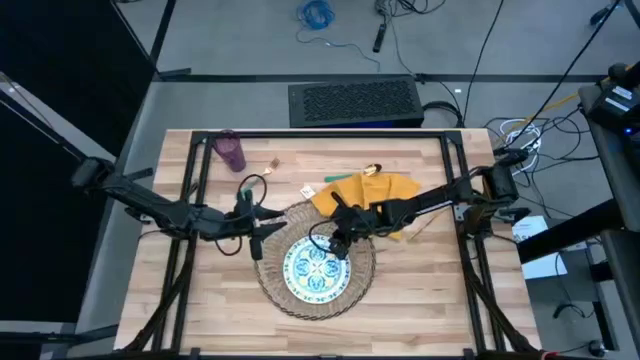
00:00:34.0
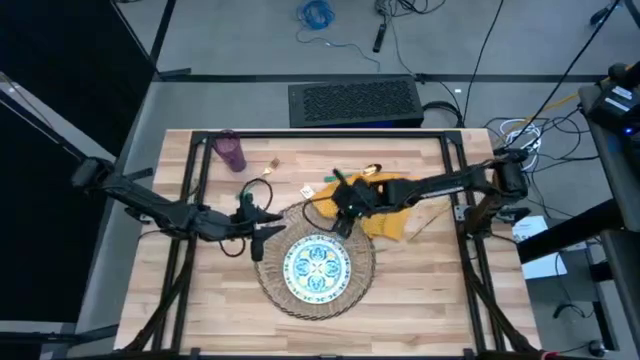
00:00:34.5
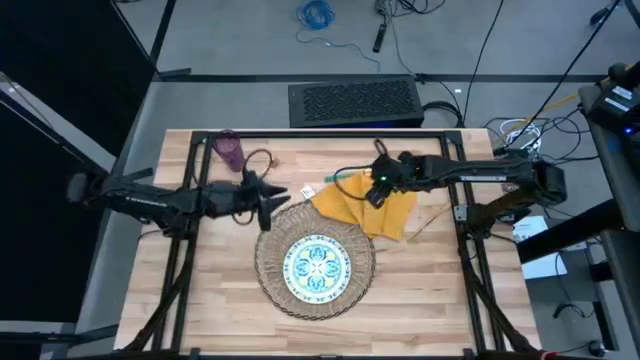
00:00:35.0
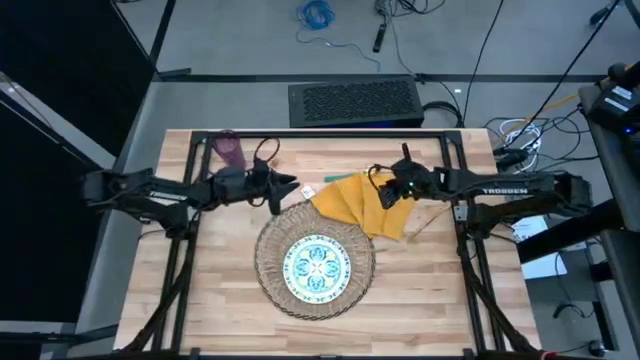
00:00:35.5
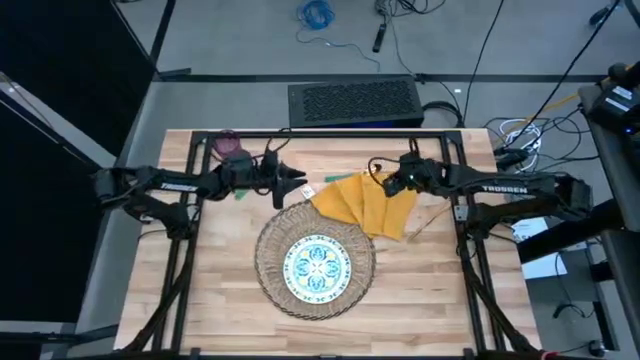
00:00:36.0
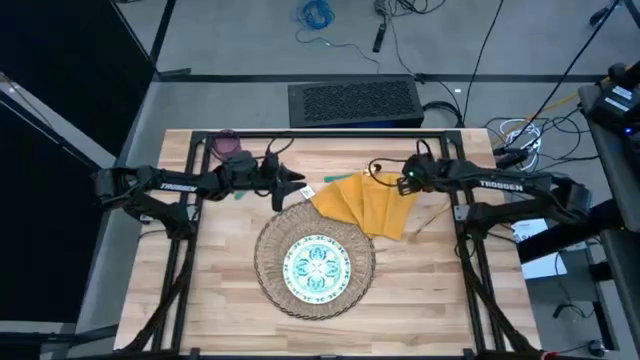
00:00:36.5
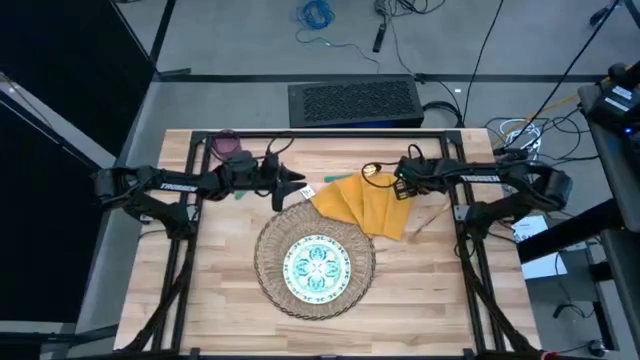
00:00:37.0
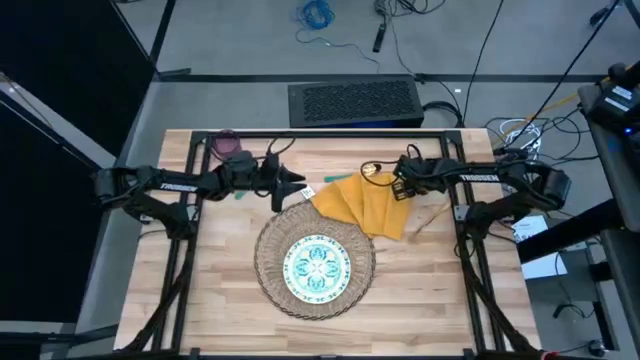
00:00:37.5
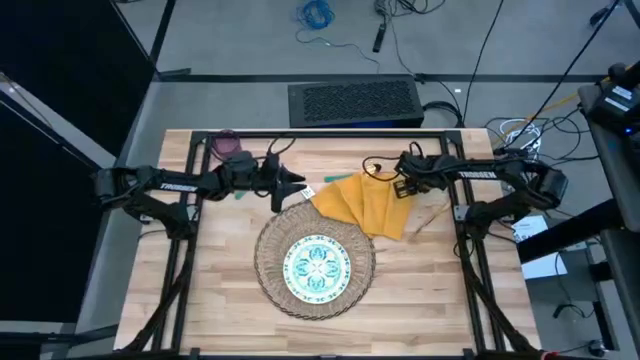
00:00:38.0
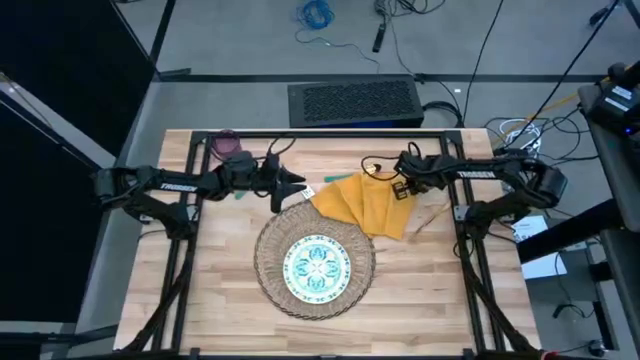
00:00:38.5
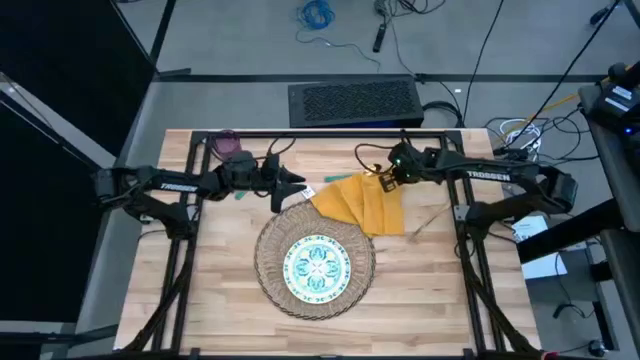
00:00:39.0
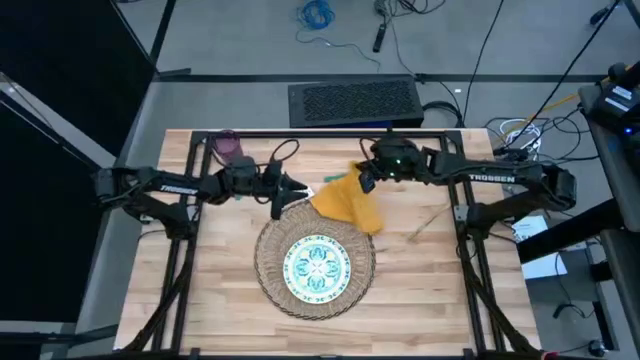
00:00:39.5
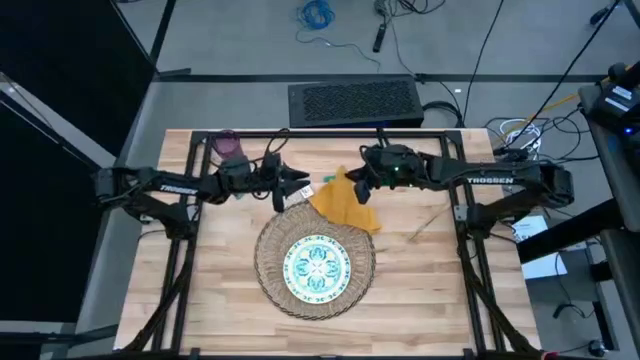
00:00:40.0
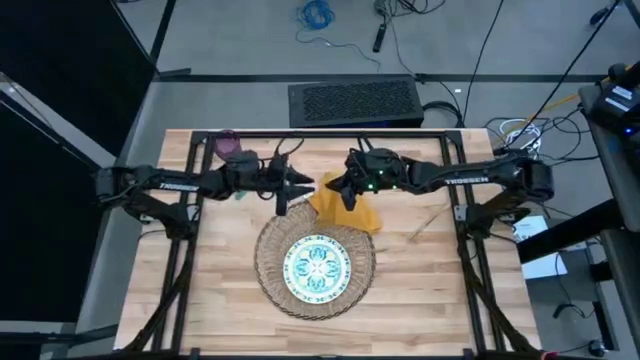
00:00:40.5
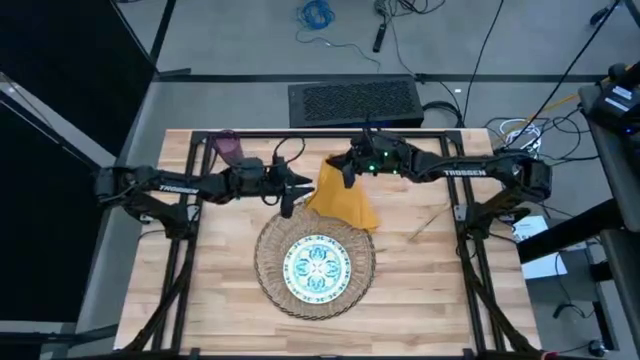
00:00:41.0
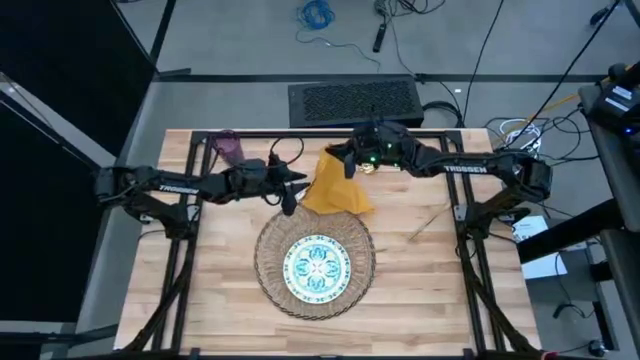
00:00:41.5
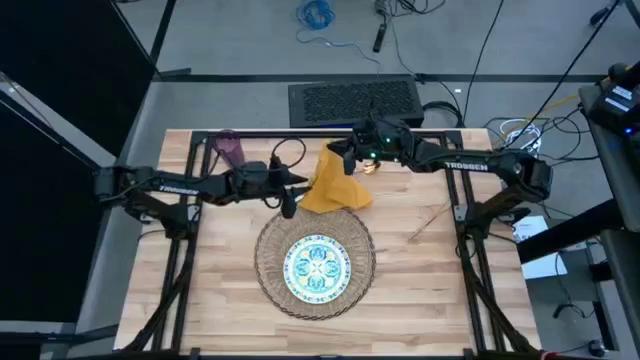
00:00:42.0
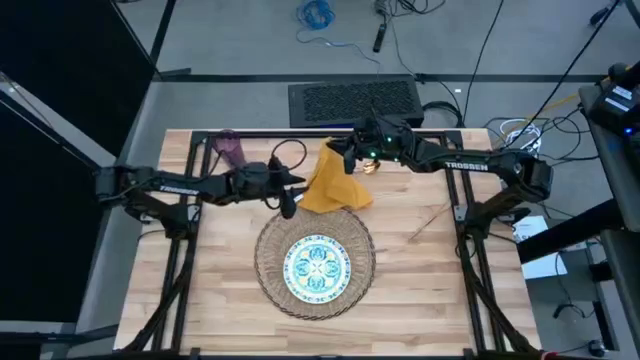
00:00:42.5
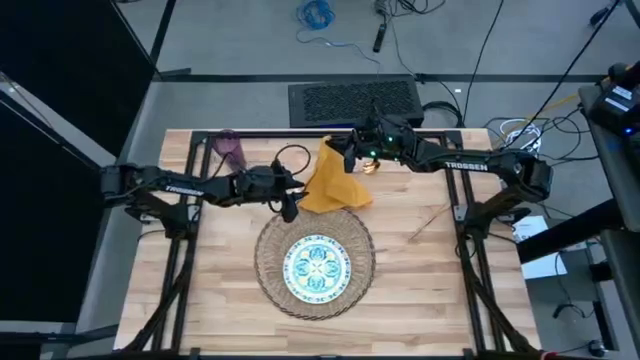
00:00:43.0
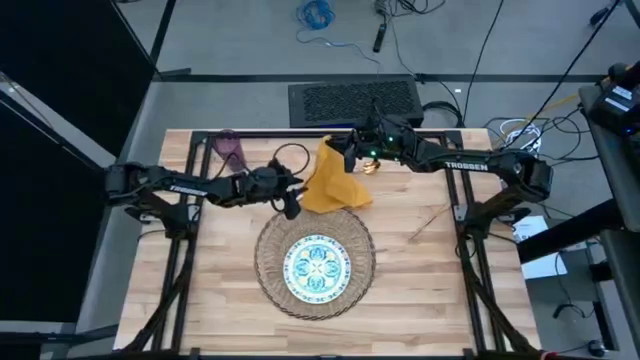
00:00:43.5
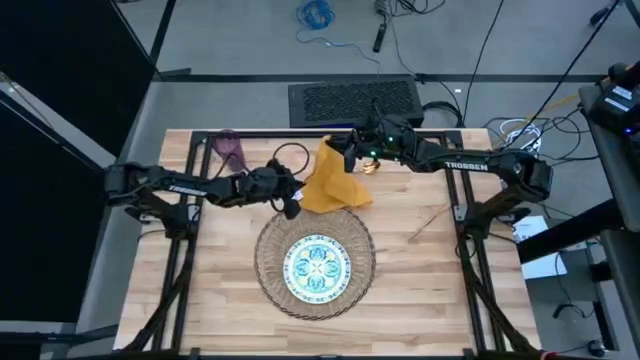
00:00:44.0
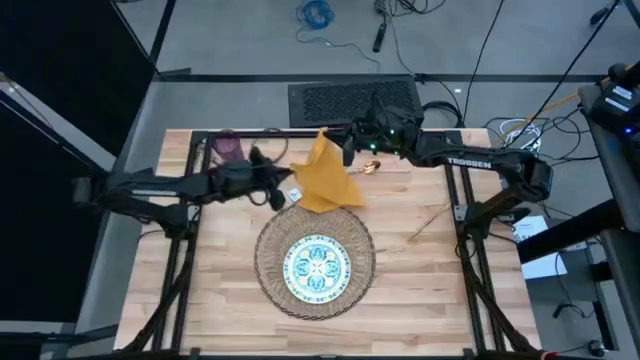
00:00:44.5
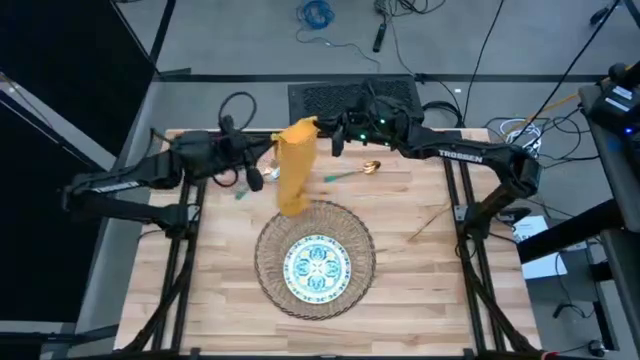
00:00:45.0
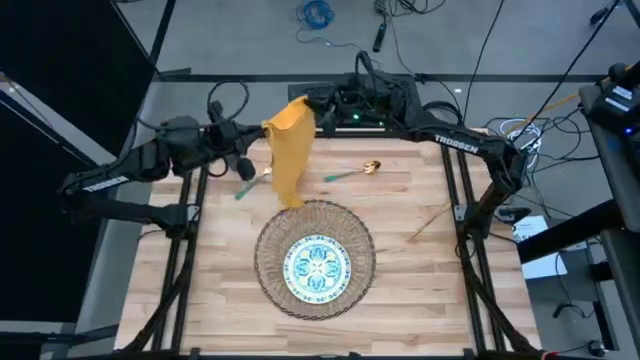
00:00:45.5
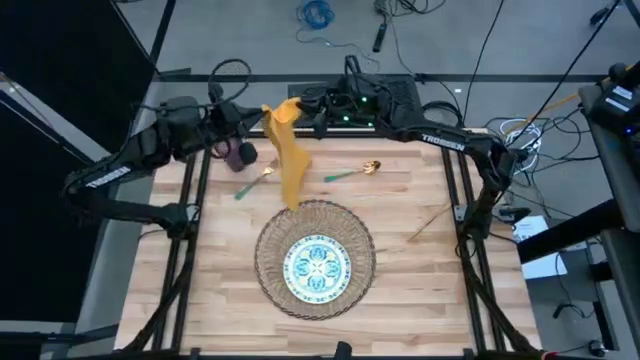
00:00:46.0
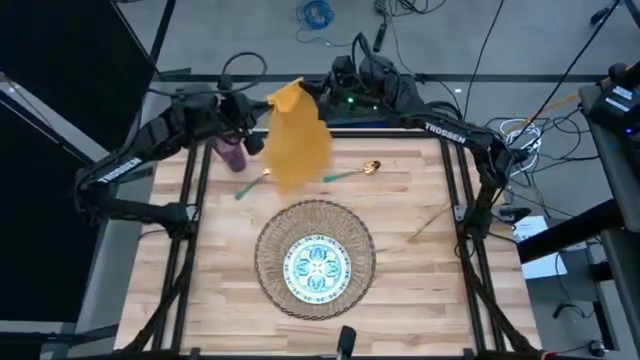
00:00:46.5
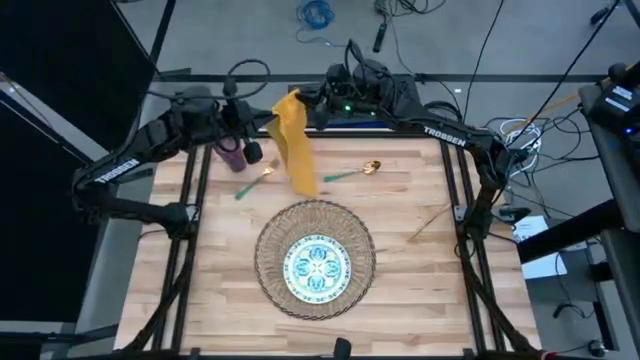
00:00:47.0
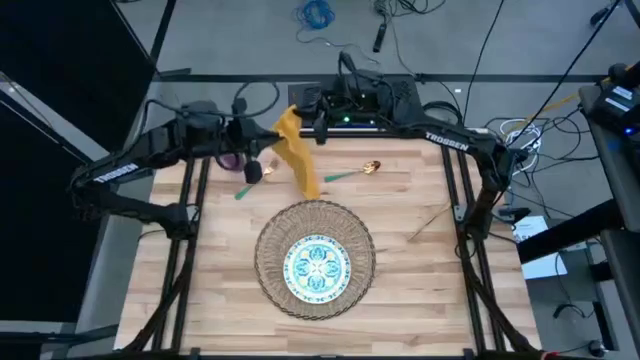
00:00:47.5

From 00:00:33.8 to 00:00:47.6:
Task: Set table place
Fold the yellow table napkin

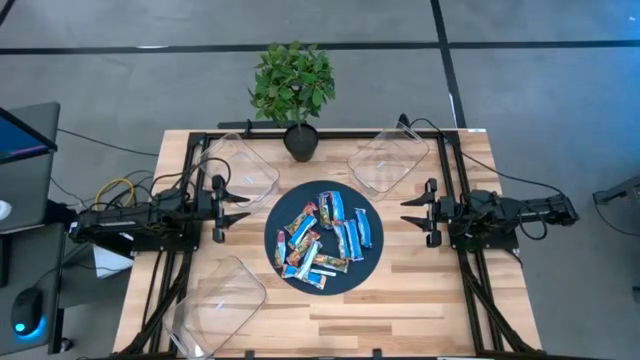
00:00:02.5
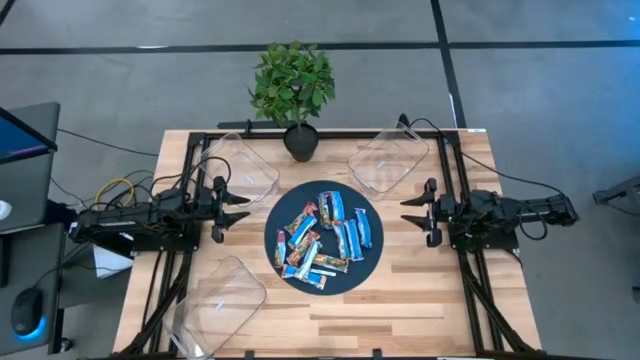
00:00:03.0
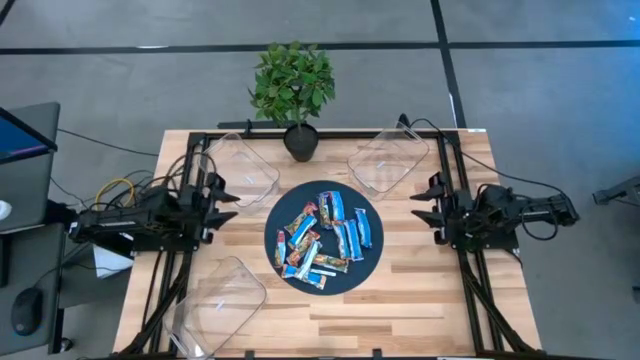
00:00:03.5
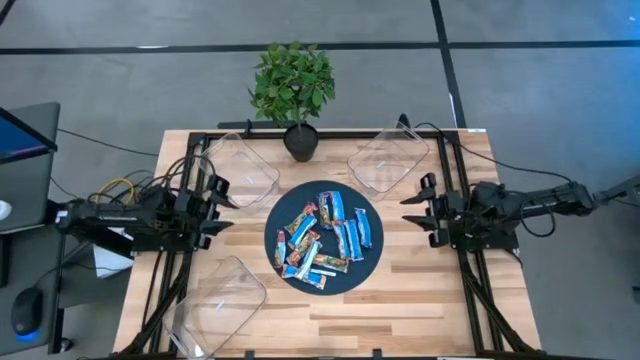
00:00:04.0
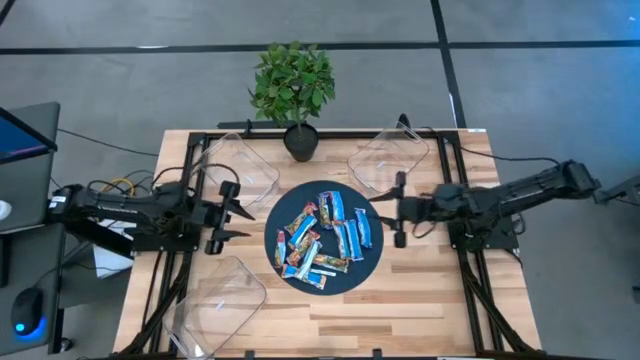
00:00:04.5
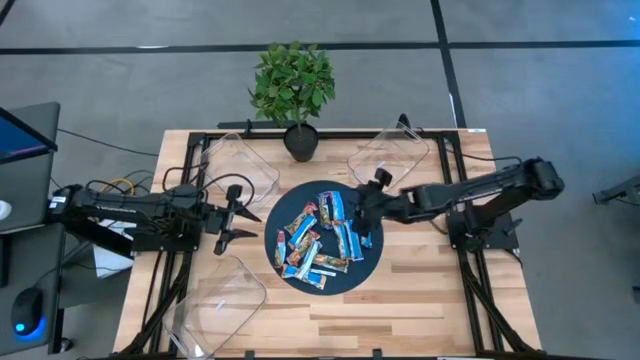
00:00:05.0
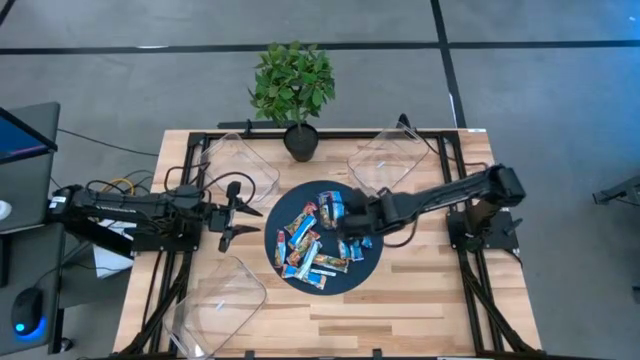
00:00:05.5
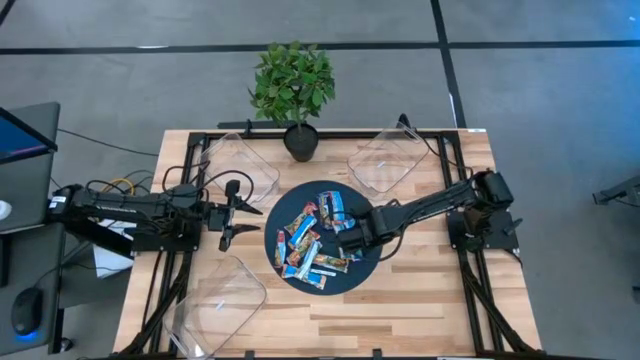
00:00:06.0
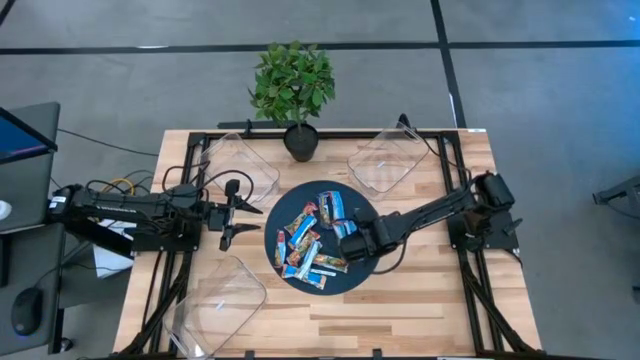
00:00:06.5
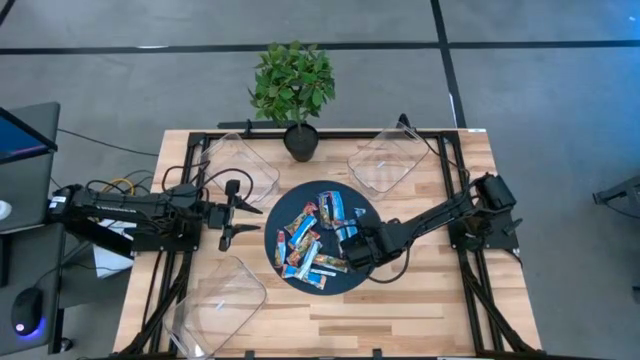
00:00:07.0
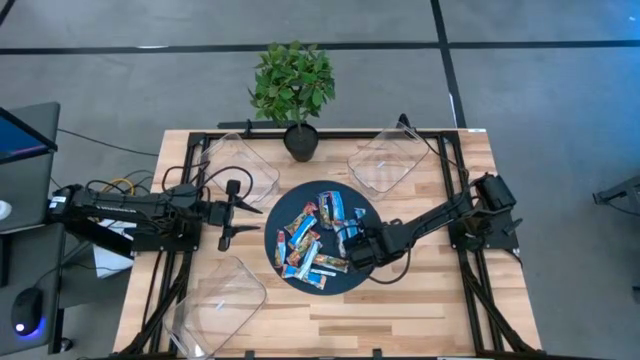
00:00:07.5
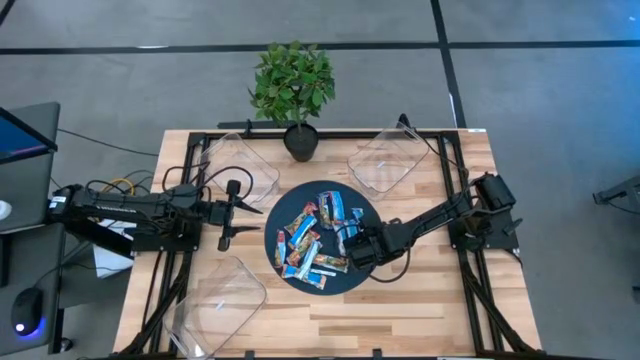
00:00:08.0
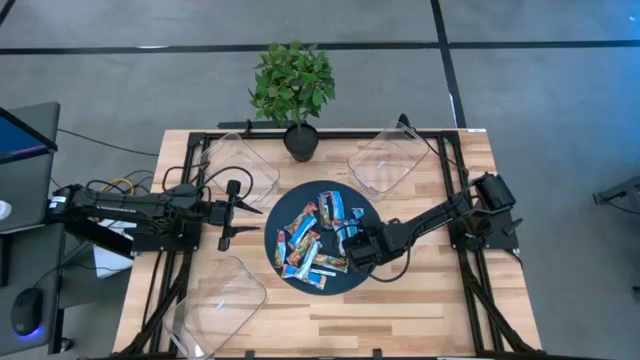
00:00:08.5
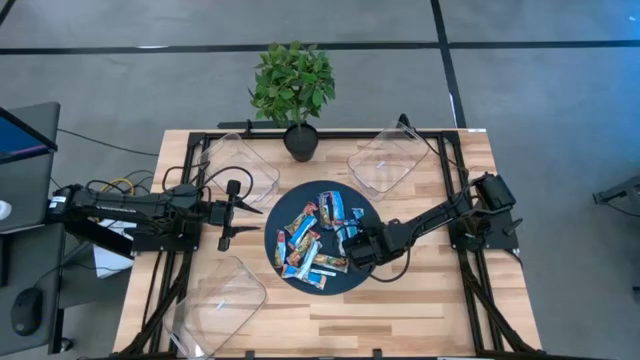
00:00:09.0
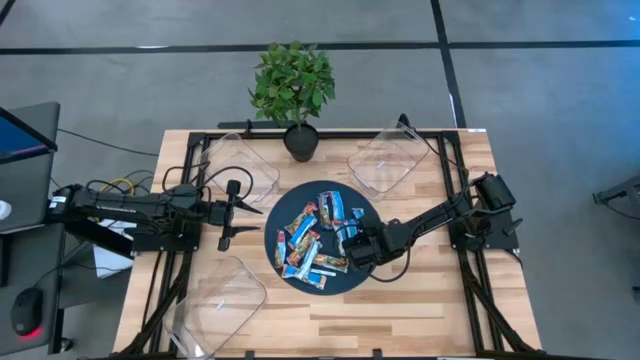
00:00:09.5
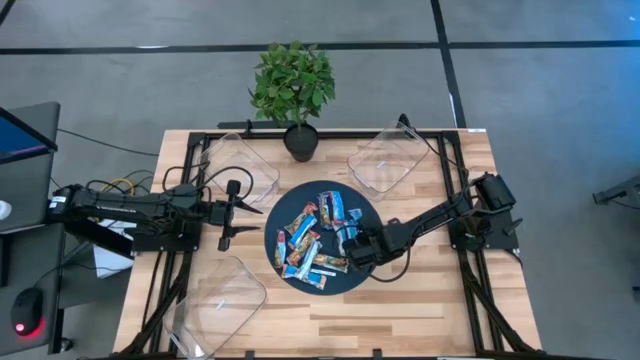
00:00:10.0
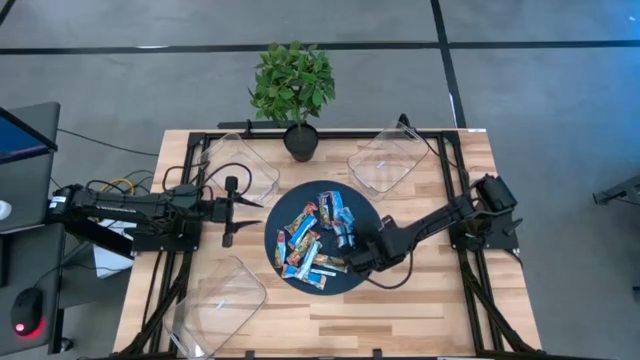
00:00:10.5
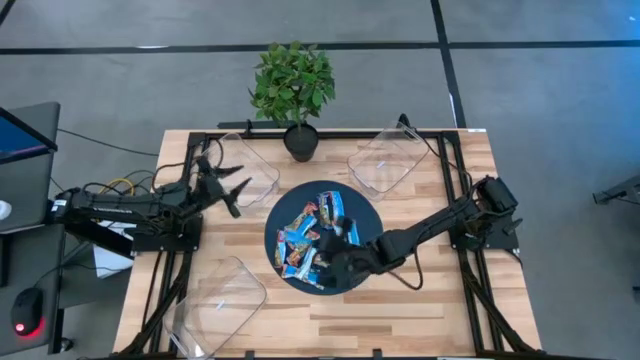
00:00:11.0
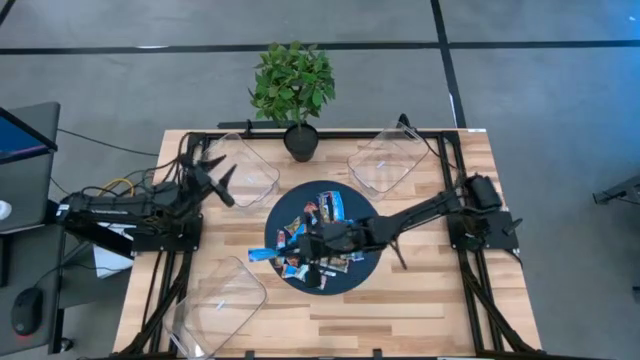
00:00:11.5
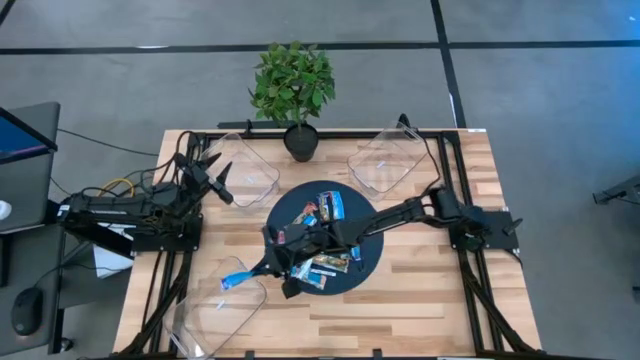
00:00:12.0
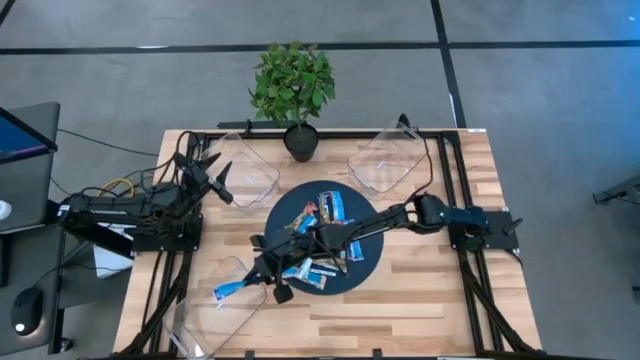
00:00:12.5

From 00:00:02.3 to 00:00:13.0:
Task: Pick and place Granola Bars by type
Put the violet granola bar into the bottom bin
